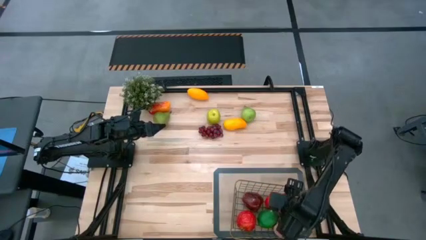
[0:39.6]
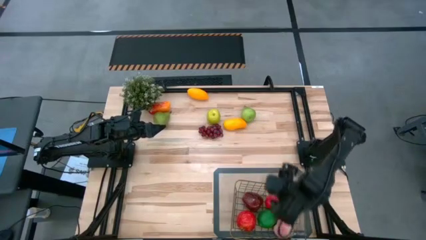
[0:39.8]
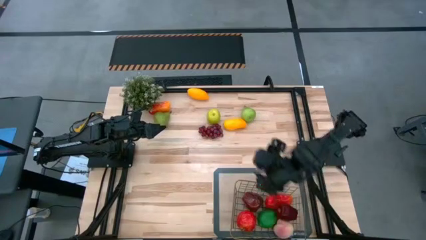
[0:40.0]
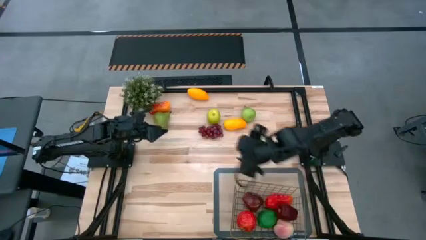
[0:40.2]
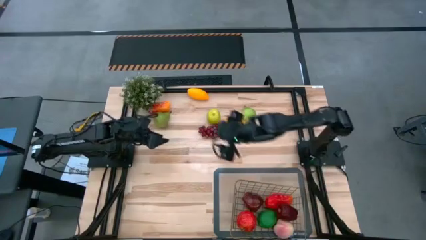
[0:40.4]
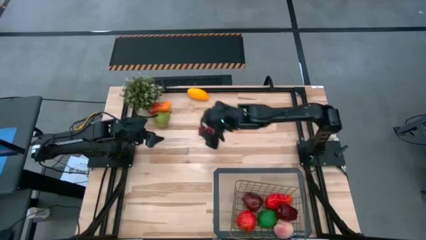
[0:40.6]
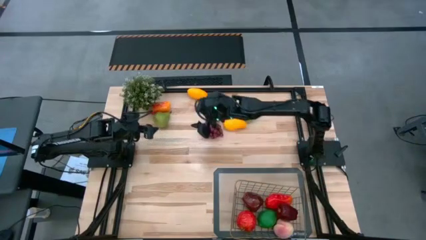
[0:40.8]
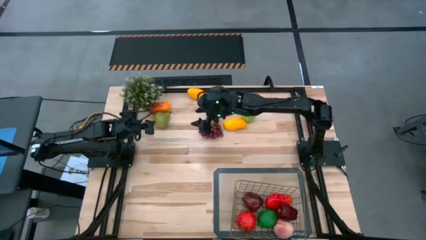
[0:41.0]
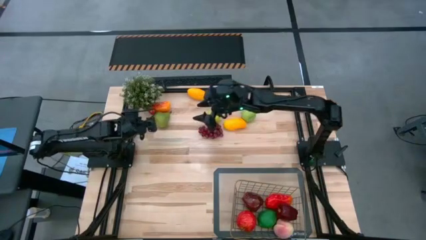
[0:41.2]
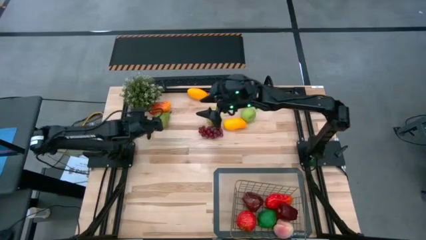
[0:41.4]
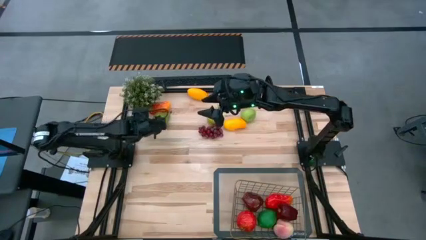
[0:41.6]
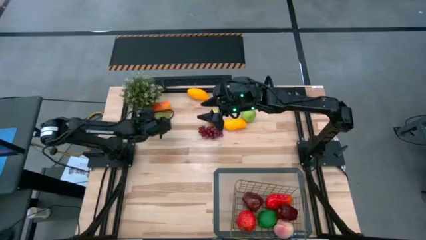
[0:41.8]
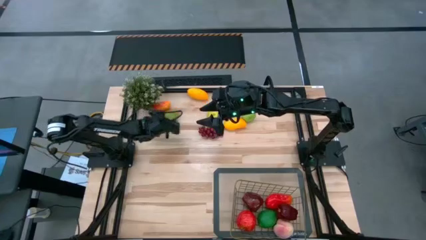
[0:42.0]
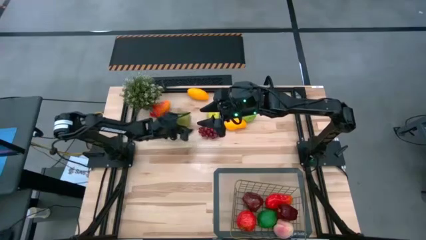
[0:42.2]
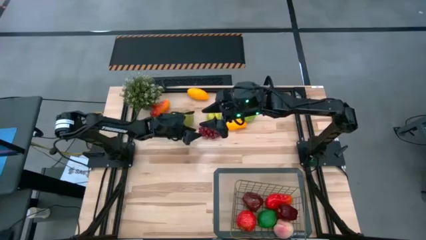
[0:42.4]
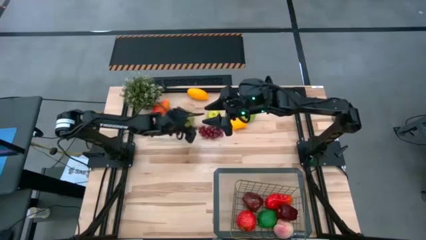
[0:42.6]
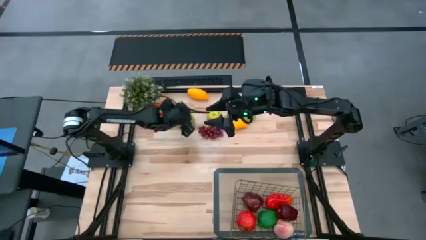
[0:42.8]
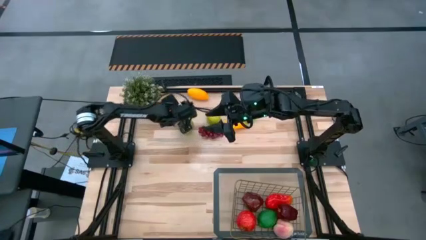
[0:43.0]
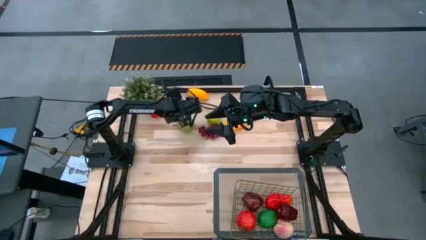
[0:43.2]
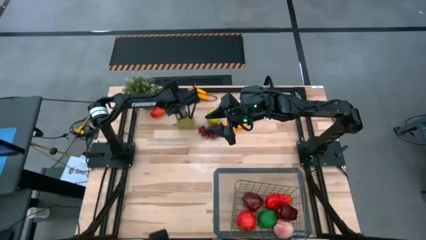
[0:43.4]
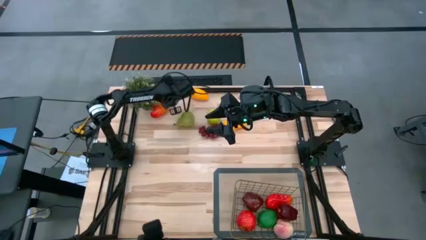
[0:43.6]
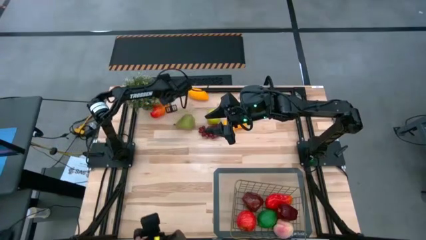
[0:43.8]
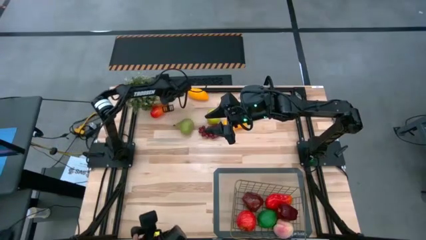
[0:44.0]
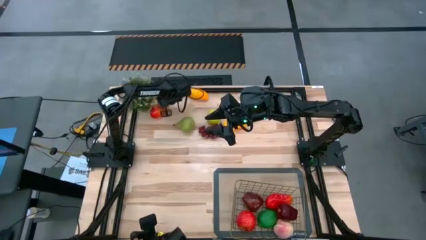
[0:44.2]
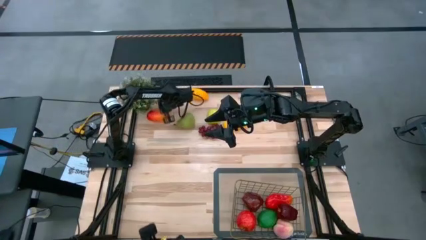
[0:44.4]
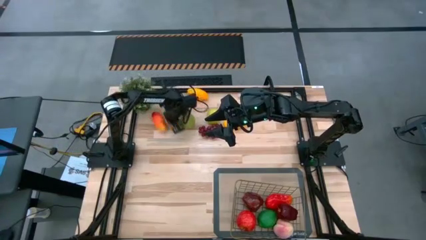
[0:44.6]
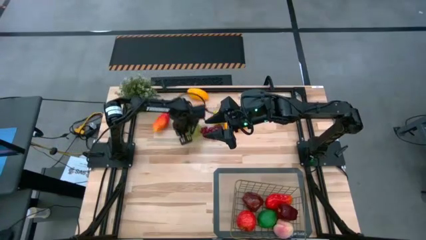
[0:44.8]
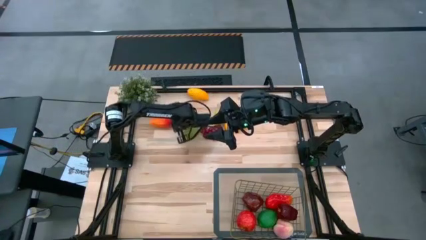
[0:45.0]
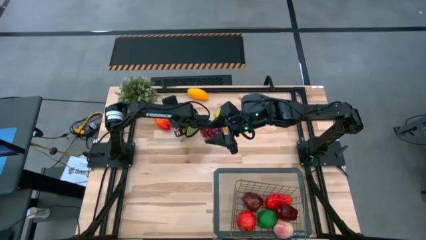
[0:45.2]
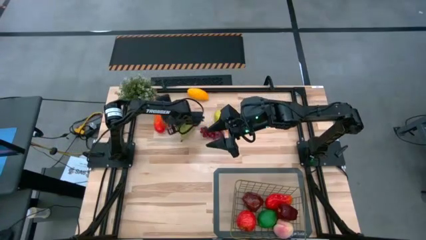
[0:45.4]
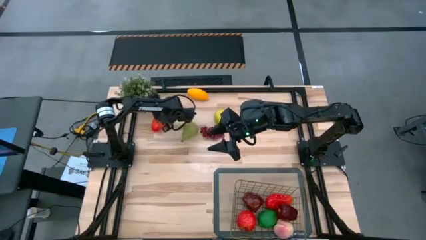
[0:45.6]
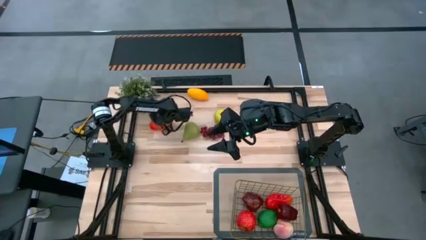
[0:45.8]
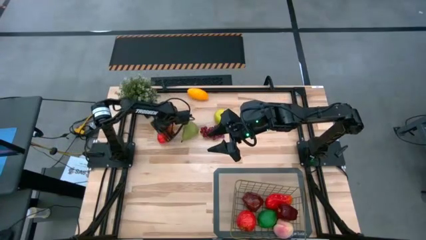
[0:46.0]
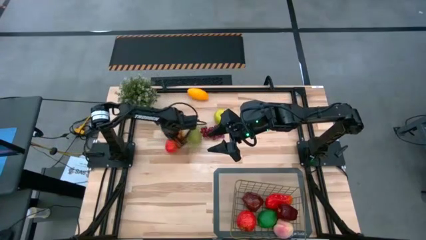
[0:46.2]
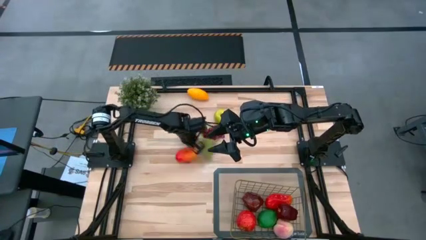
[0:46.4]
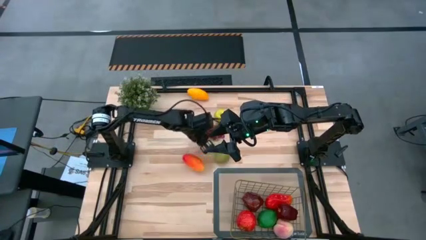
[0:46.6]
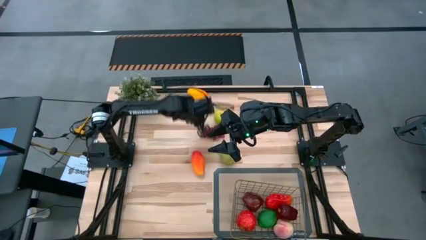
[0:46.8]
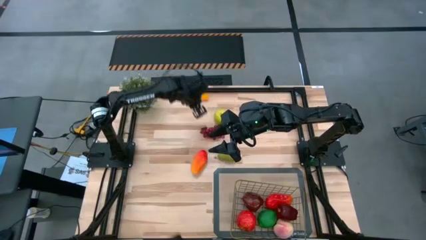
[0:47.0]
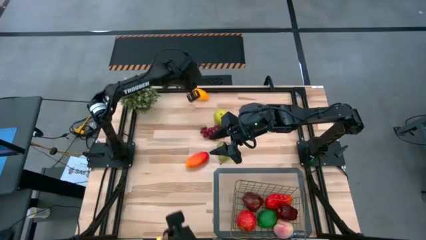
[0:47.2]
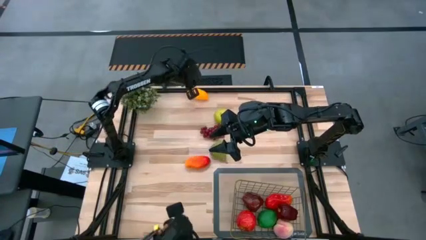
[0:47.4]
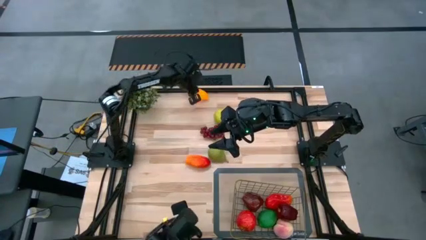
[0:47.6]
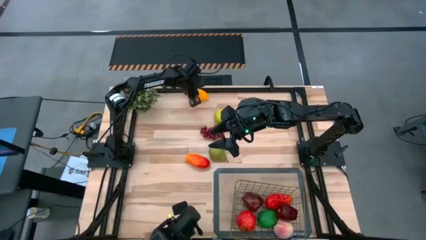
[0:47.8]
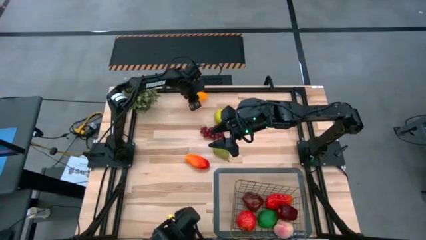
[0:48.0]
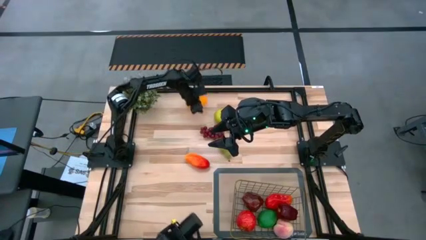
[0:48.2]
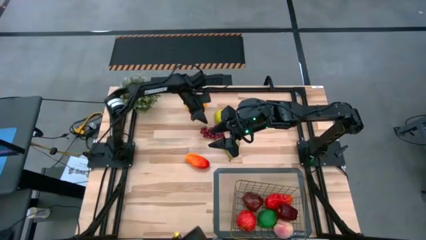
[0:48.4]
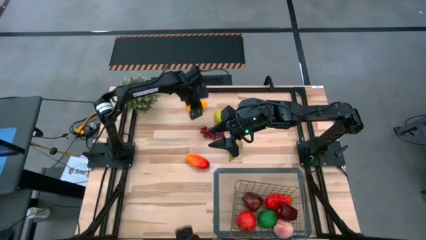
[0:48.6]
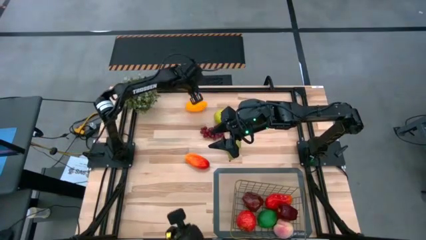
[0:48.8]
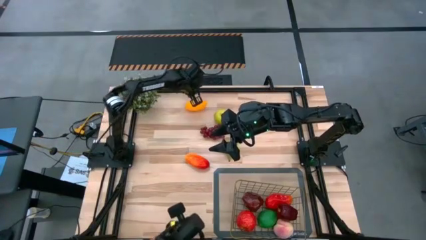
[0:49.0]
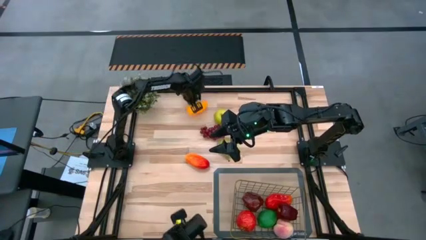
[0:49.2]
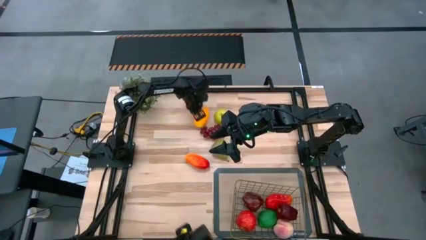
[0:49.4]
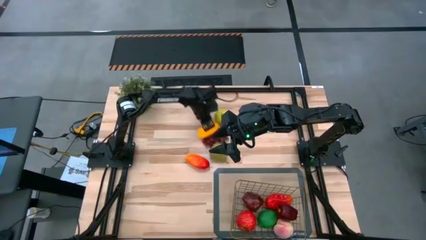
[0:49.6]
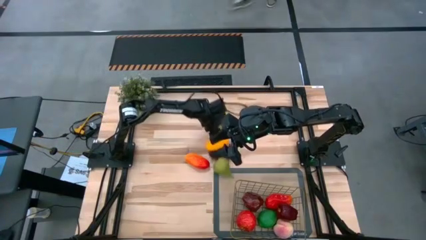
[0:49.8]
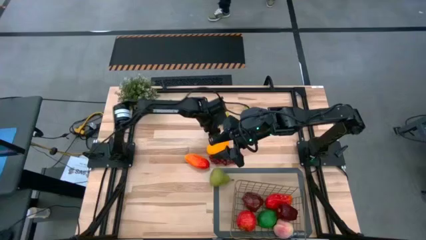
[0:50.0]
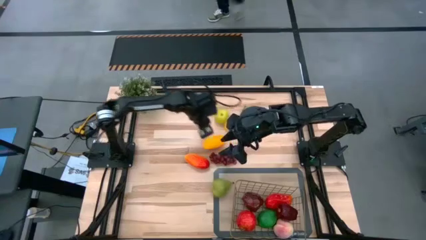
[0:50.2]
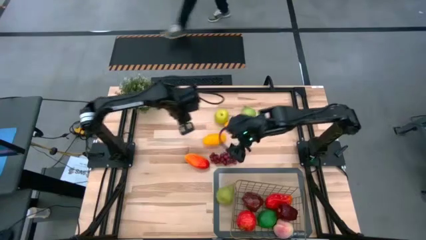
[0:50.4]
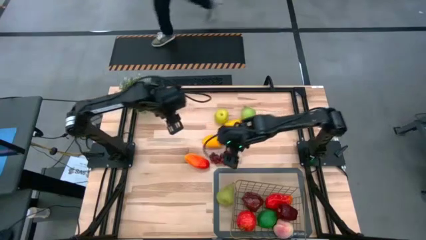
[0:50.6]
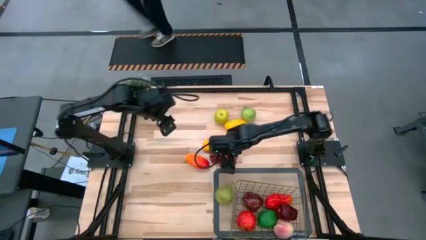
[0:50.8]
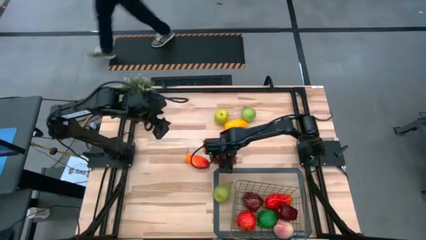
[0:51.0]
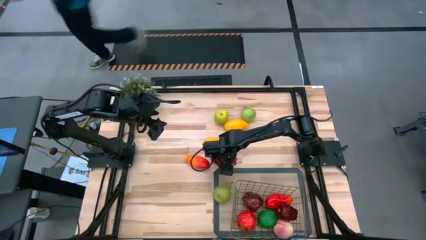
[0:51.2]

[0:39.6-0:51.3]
Task: Build produce basket
Move the fruits to the center of the table

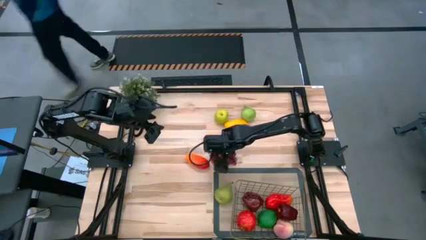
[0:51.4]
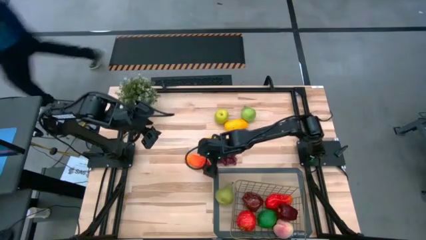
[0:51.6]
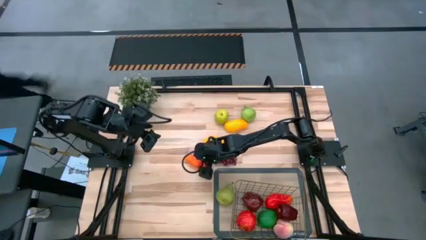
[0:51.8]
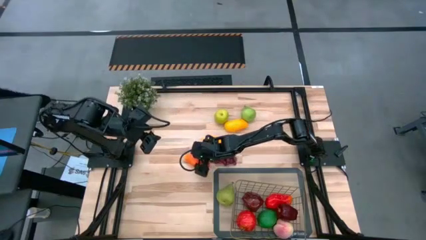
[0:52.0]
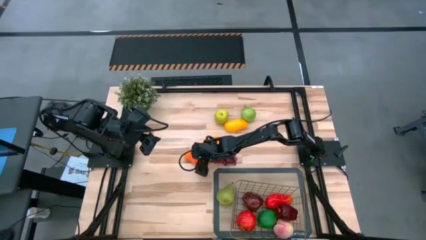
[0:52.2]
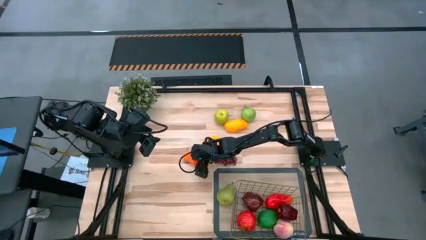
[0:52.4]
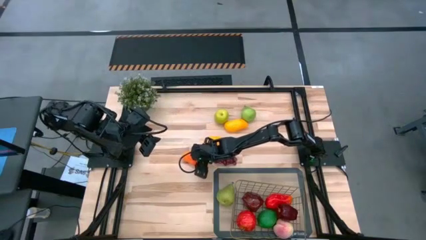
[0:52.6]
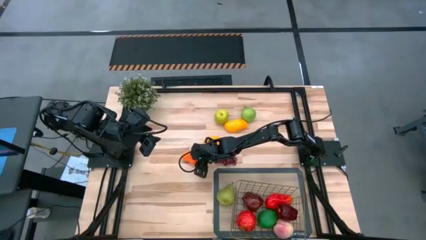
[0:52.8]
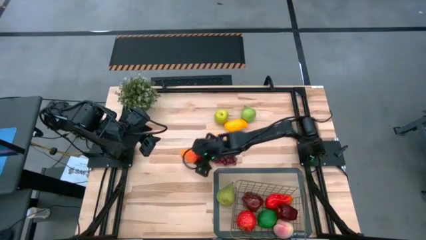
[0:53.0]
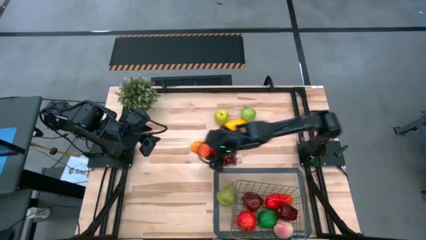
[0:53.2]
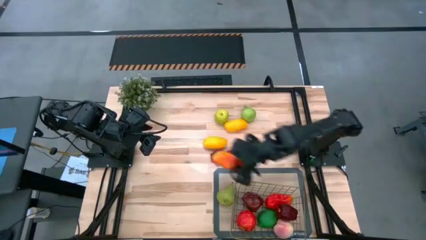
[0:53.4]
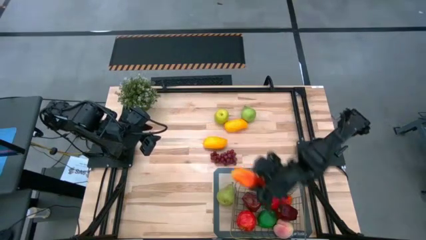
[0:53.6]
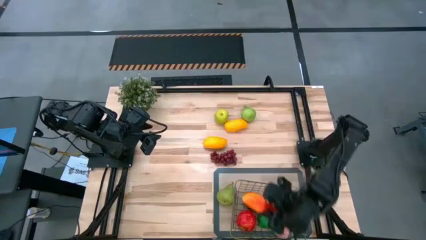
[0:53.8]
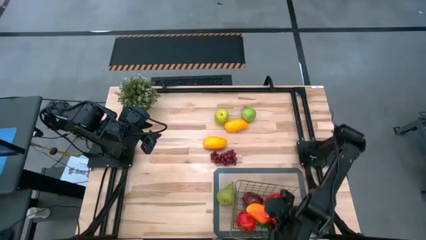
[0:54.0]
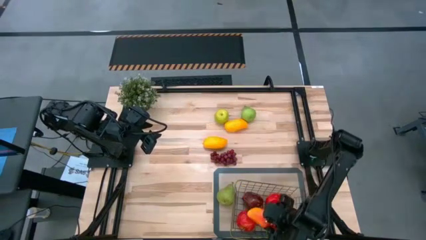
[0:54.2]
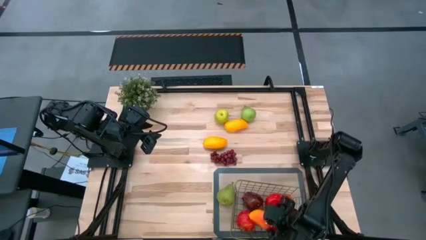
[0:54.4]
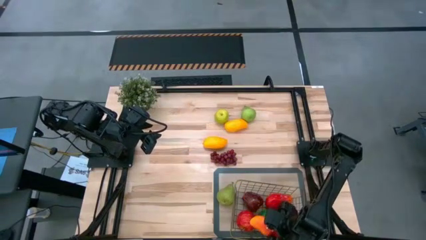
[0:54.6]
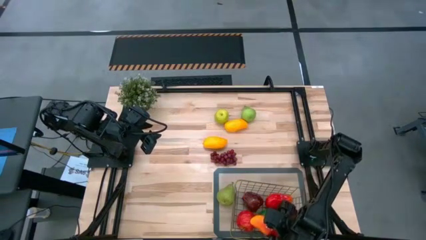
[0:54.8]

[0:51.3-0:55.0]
Put the red mango into the wire basket
